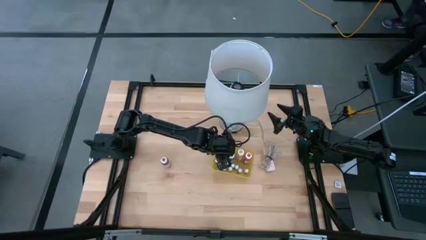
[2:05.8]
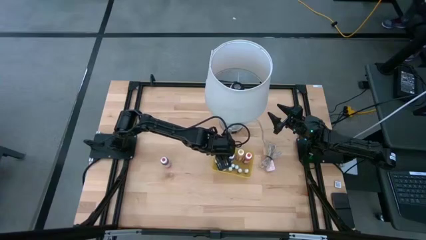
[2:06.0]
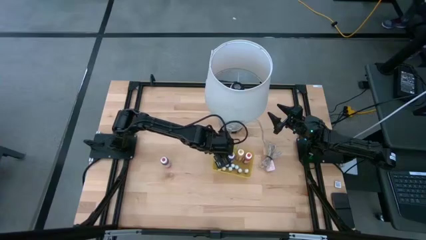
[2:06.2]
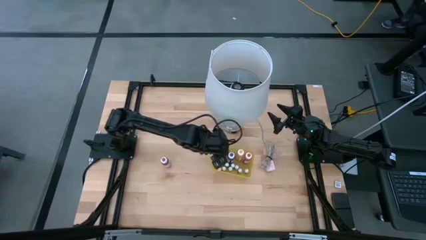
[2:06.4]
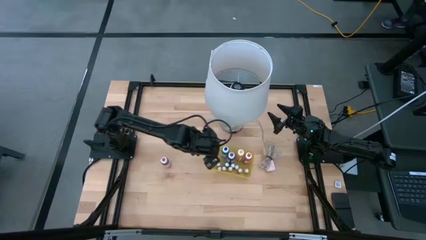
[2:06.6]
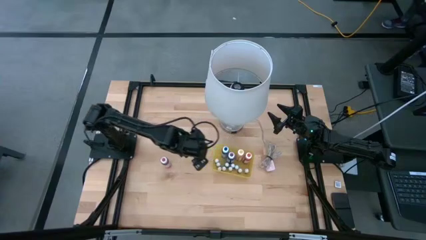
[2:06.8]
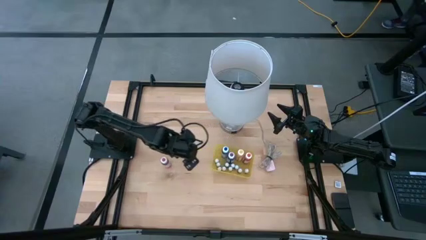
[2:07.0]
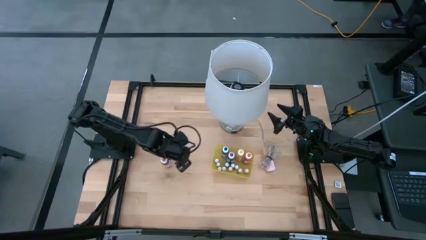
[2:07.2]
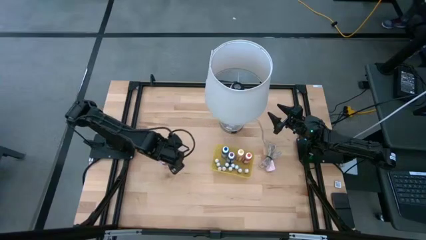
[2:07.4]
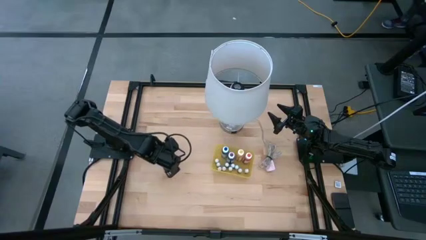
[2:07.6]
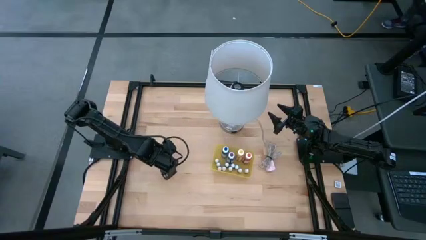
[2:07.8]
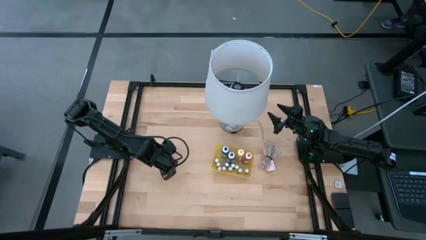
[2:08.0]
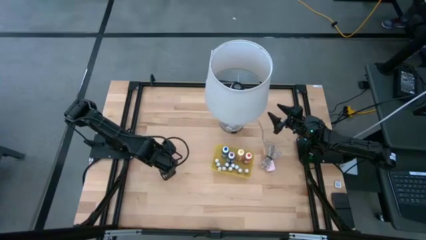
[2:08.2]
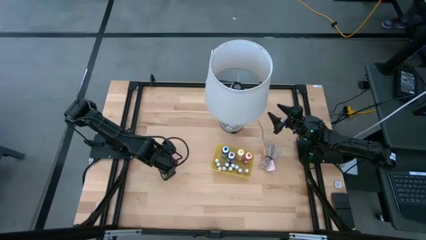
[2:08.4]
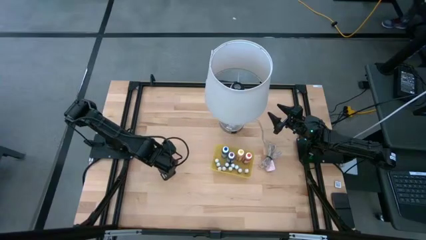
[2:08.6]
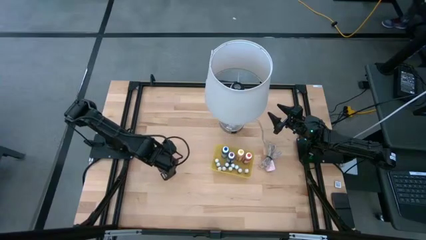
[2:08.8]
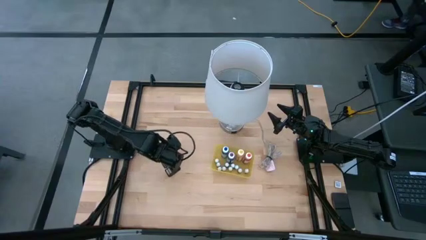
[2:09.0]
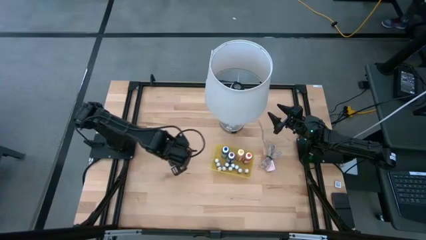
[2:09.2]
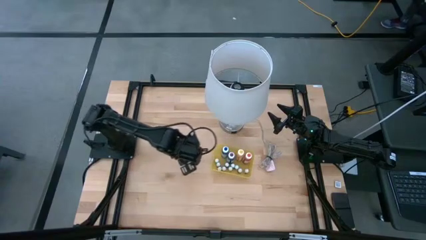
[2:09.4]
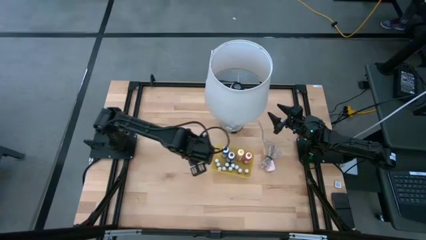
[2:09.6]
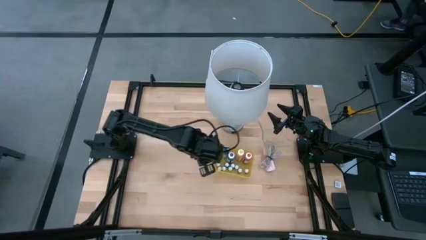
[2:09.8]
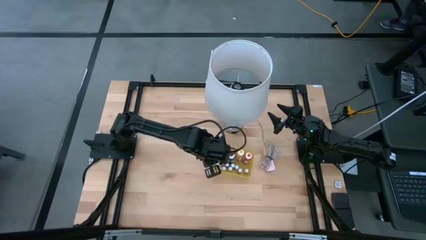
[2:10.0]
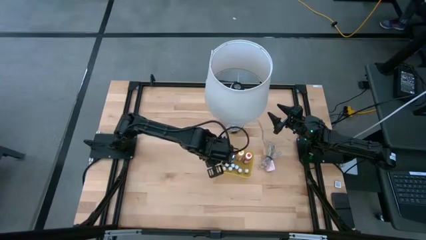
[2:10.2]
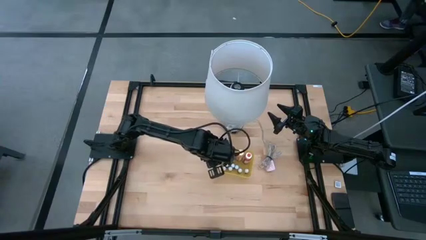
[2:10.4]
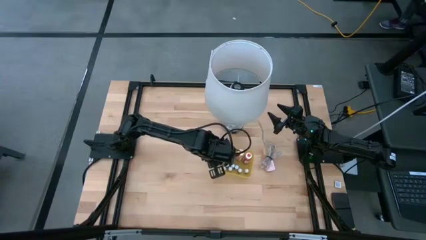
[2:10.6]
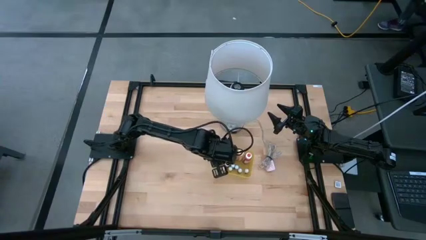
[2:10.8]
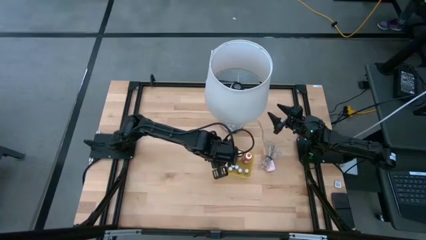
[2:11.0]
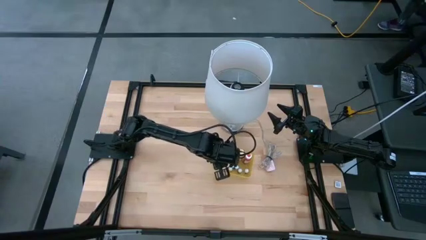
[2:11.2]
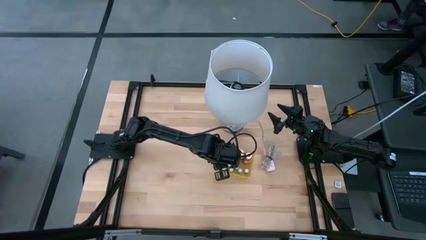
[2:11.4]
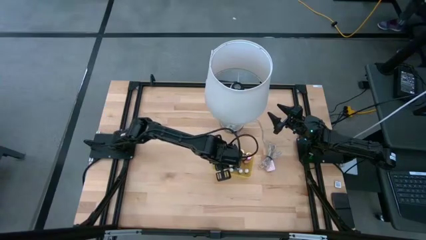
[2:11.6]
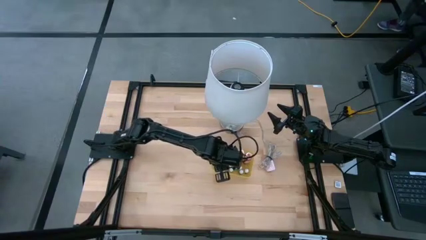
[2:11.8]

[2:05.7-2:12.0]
Task: Pick & Place food coloring
Put the red food coloring bottle into the yellow bin

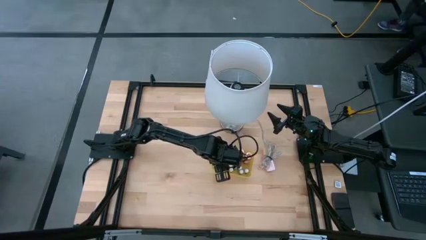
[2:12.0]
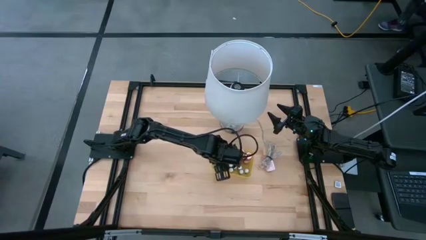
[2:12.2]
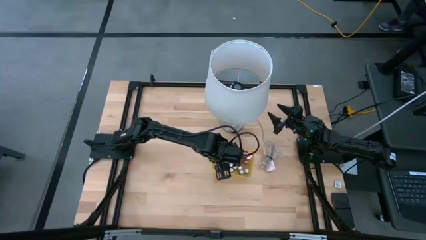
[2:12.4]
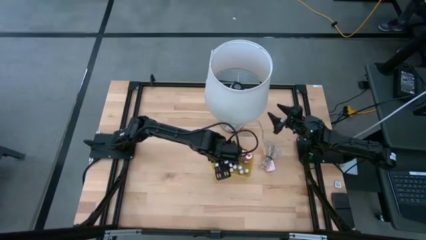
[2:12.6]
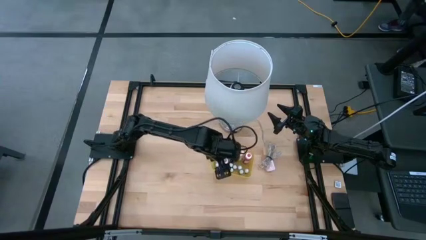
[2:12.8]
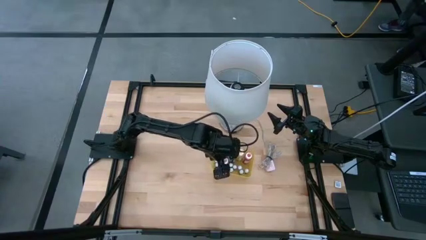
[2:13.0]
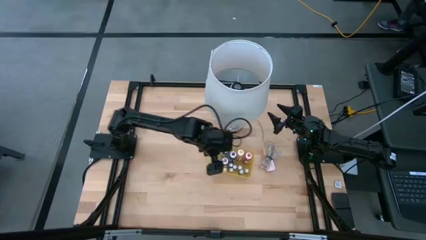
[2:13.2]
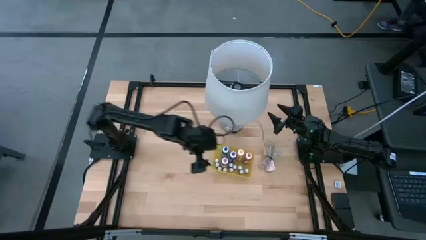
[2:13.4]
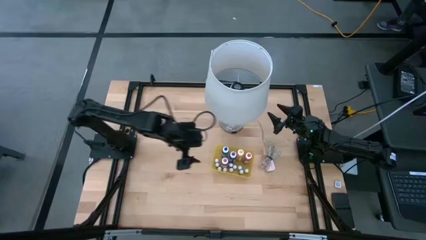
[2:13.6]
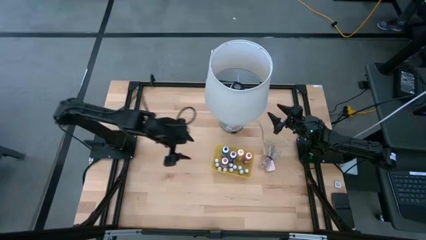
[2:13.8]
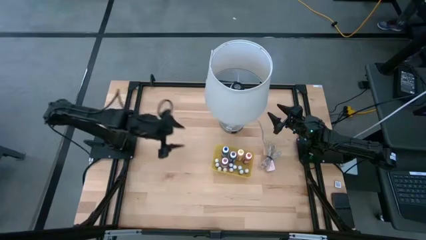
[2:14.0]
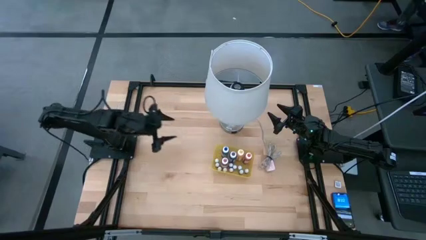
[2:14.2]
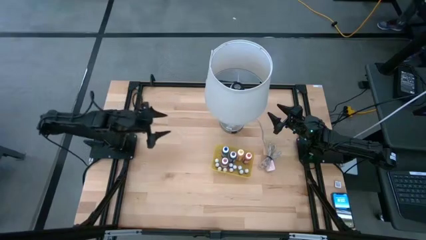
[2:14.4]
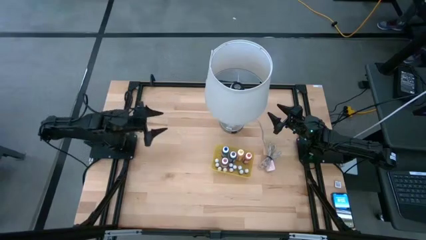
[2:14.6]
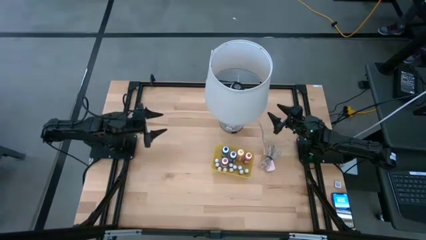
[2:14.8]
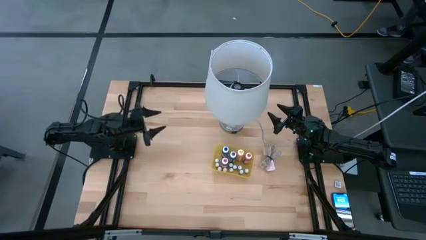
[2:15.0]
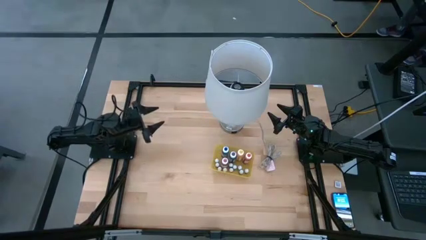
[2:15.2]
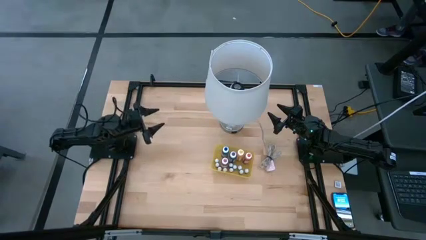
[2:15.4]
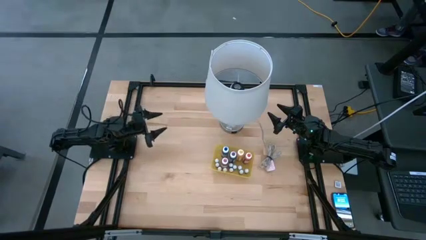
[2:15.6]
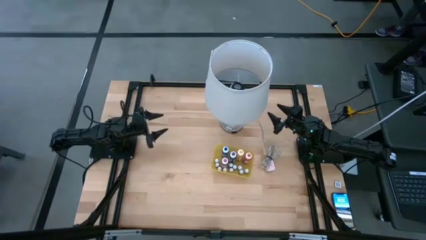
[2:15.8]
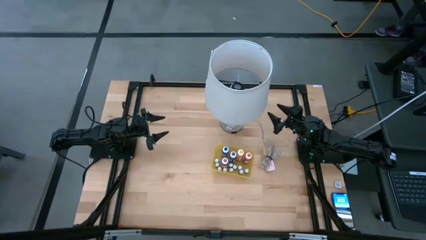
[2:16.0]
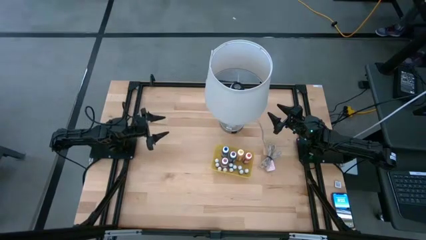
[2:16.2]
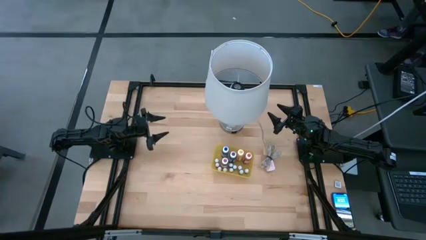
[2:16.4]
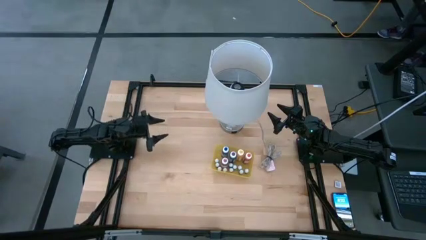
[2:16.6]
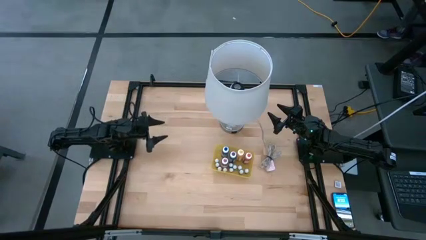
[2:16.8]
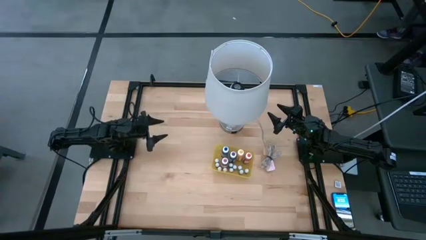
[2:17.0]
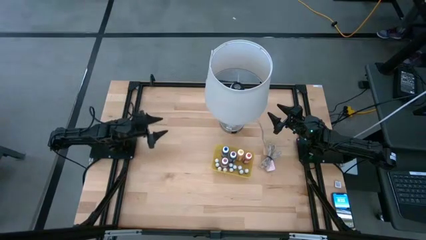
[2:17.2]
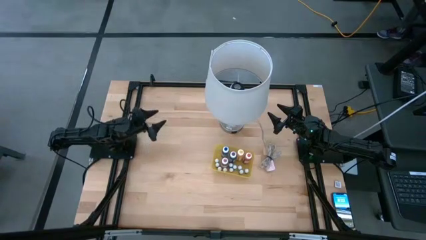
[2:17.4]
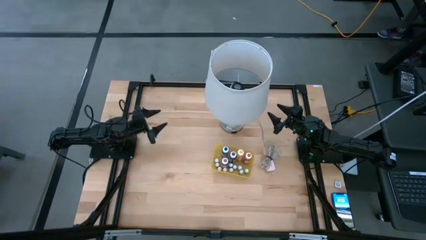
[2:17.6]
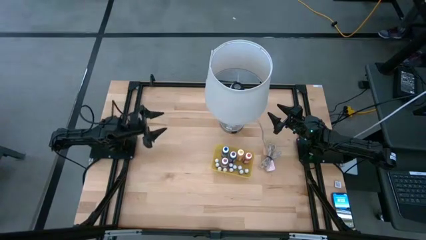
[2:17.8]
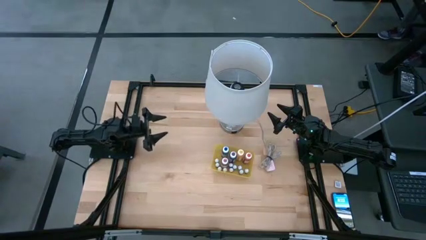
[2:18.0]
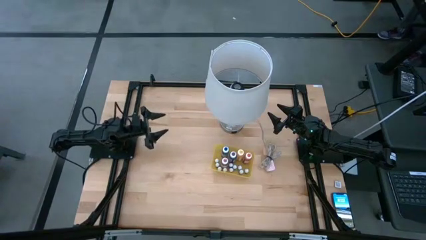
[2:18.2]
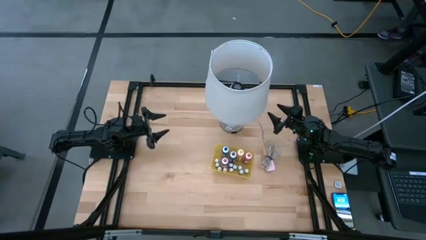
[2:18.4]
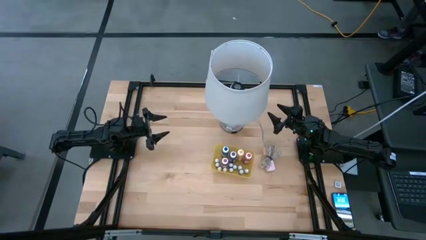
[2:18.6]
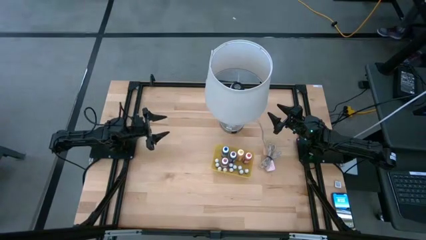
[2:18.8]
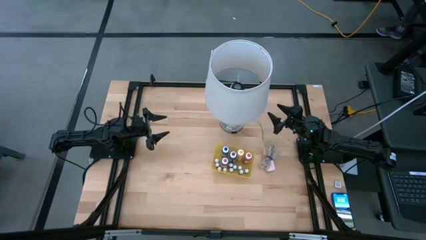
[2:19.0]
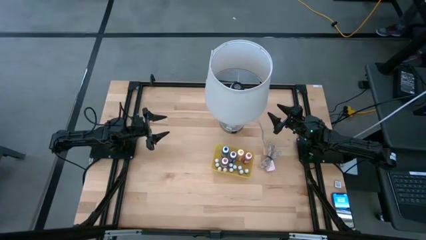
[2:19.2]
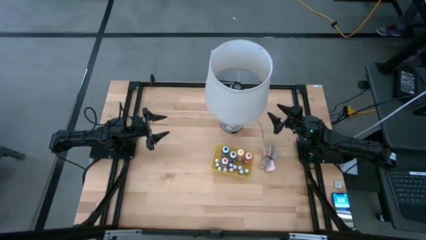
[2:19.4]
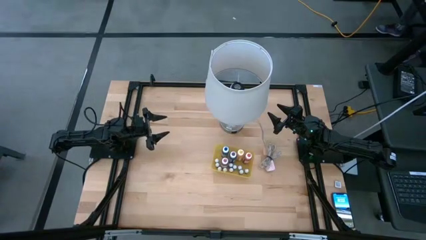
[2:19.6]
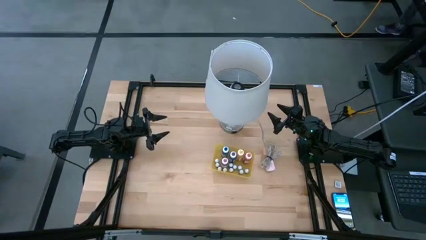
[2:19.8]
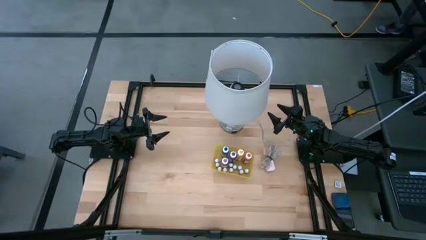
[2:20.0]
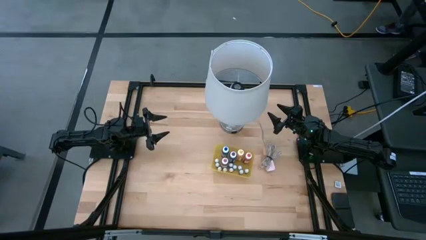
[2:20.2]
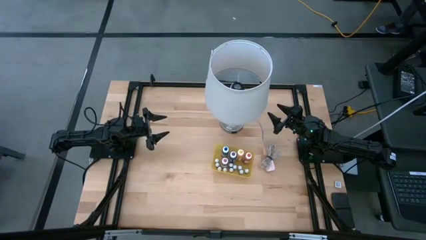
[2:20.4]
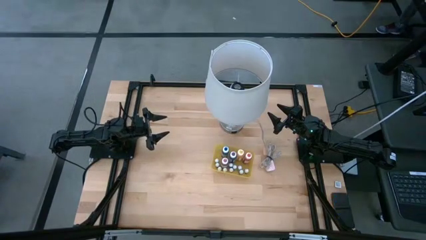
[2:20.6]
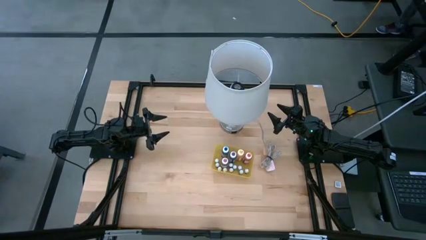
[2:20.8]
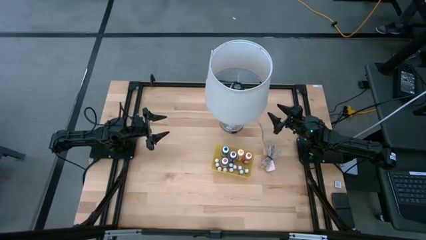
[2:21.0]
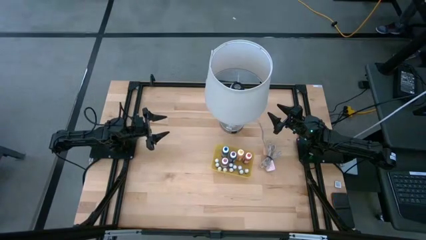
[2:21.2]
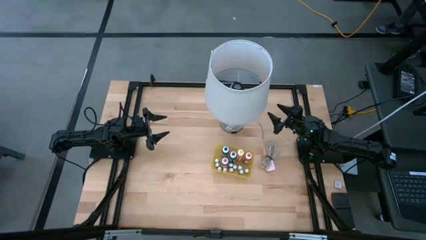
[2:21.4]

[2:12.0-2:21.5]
Return to Home Position

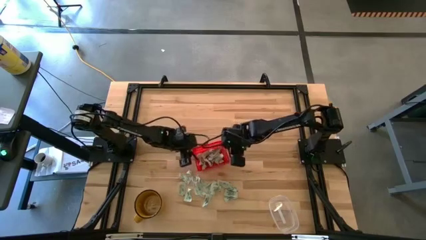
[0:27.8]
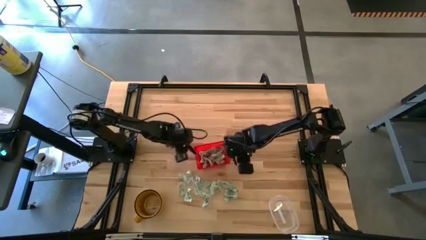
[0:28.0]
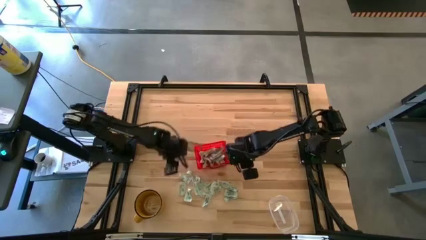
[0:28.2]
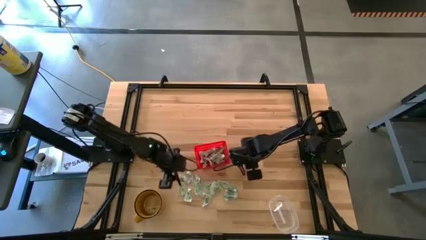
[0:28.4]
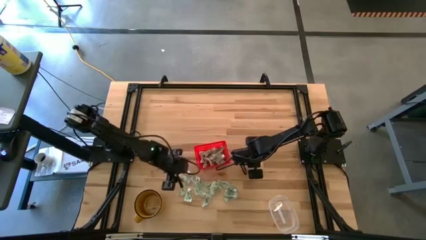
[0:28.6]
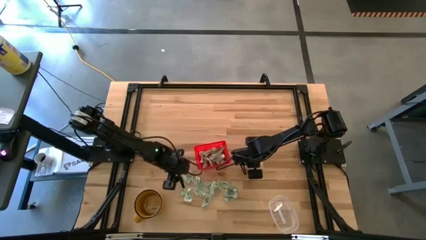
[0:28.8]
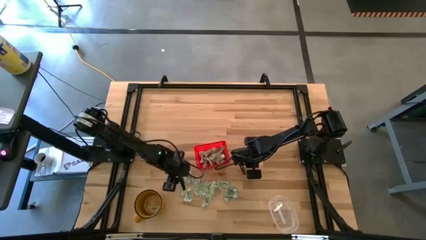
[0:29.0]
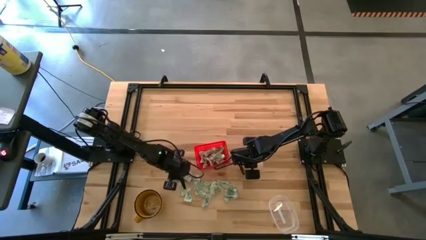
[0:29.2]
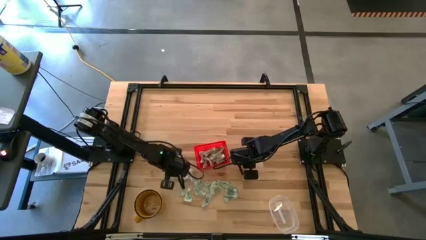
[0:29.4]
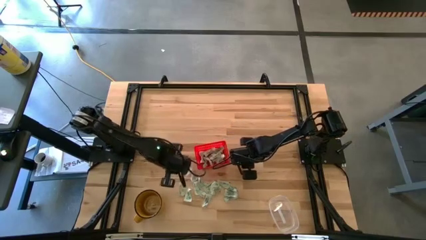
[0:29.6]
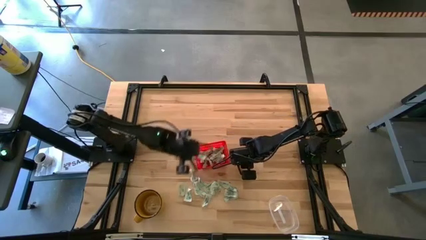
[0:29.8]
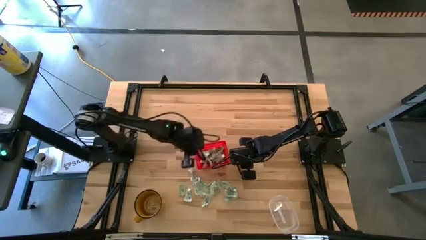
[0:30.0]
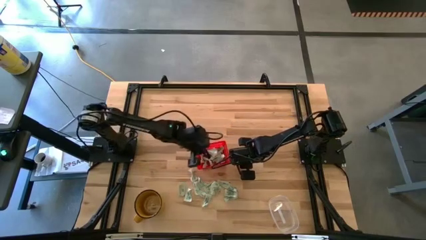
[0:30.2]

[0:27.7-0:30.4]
Task: Pick and place Stevia / Truvia into bins
Put the stevia packet into the orange basket
